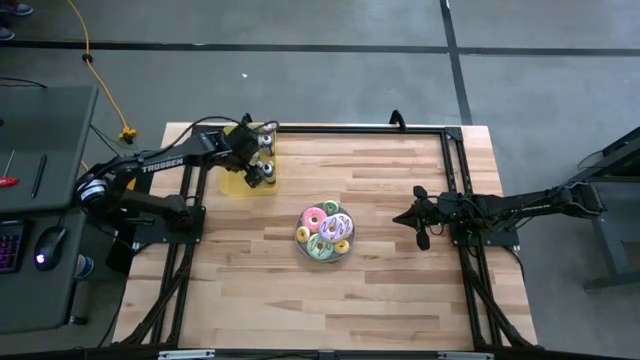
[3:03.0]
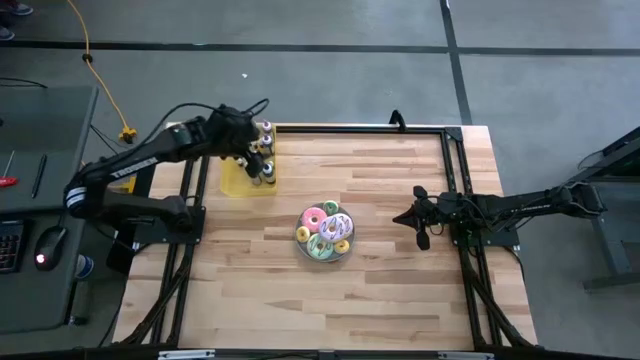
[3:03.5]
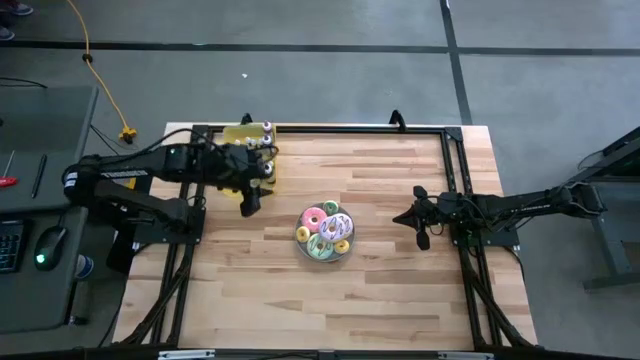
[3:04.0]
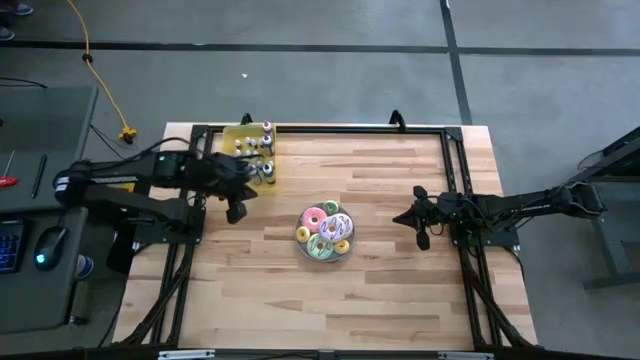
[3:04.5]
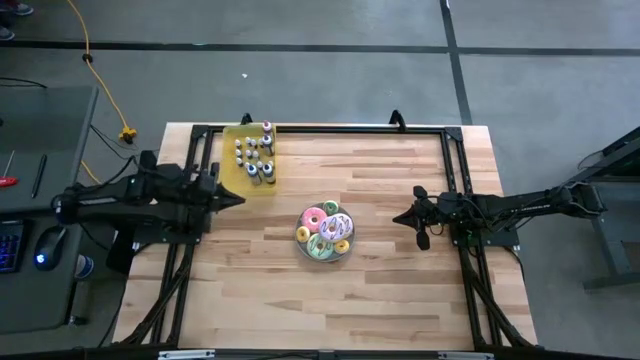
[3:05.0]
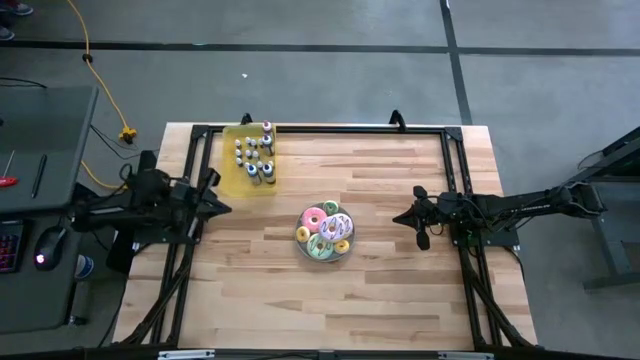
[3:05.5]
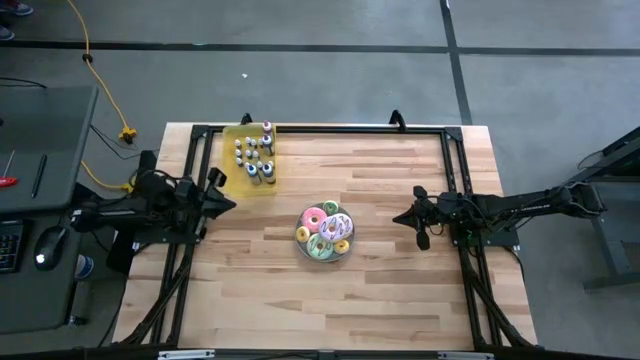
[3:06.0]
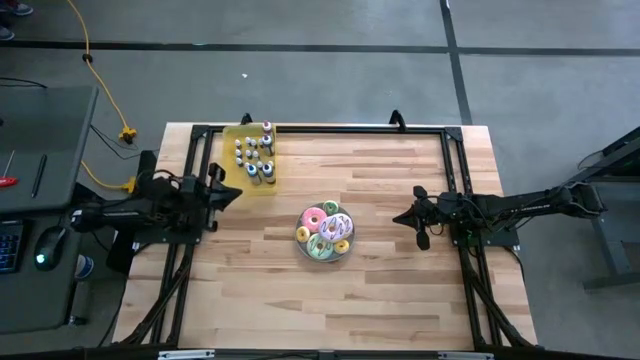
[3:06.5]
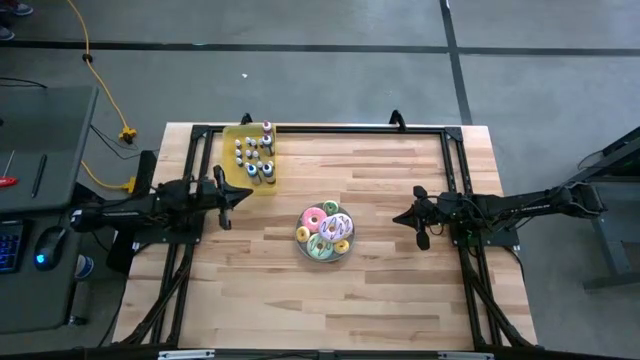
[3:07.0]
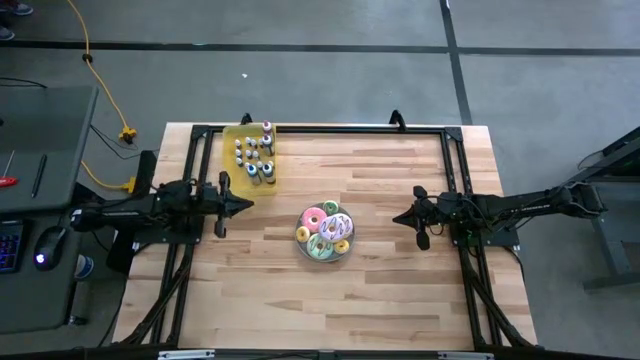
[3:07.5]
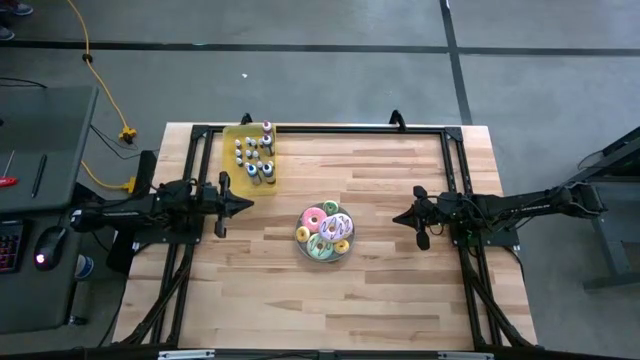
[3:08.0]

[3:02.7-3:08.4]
Task: Pick & Place food coloring
Return to Home Position

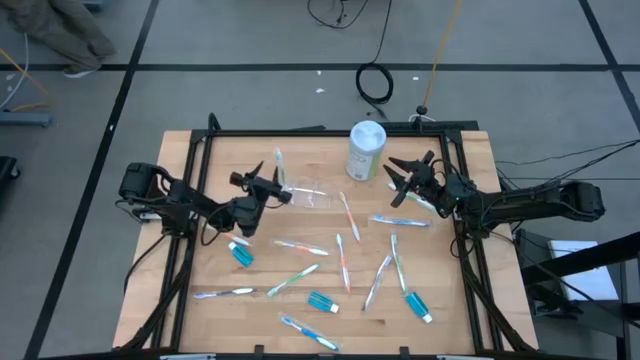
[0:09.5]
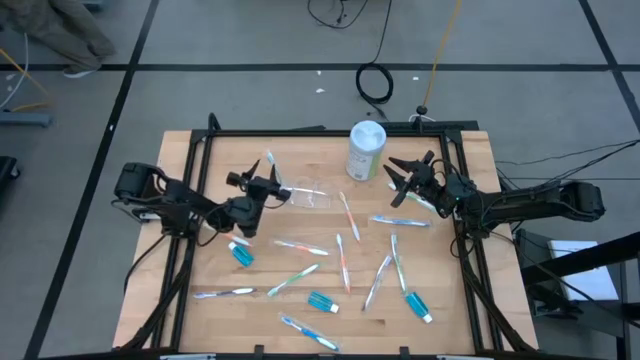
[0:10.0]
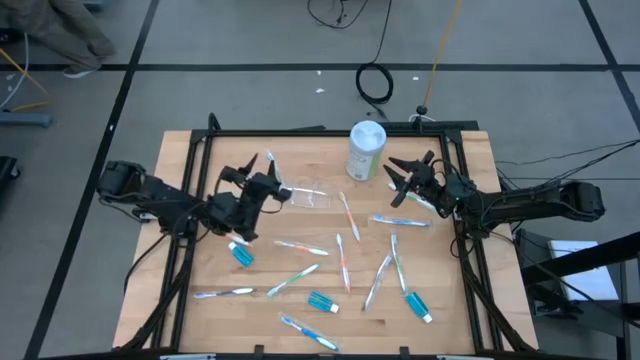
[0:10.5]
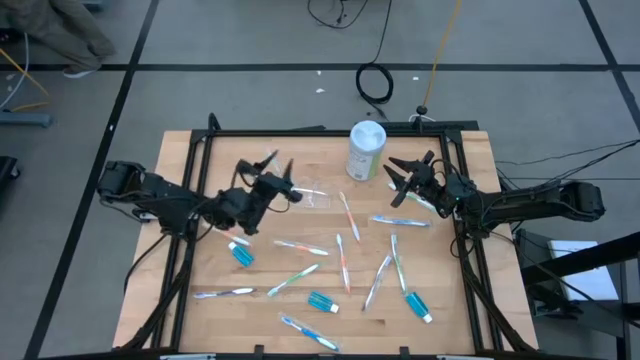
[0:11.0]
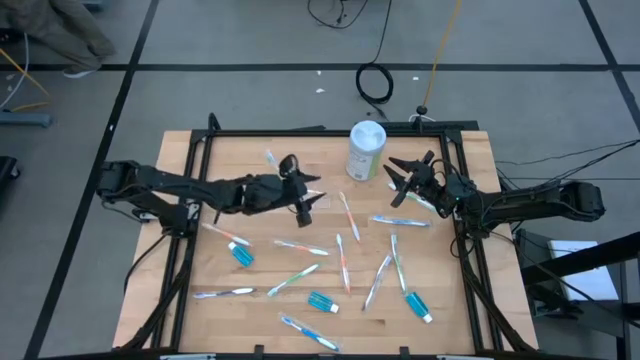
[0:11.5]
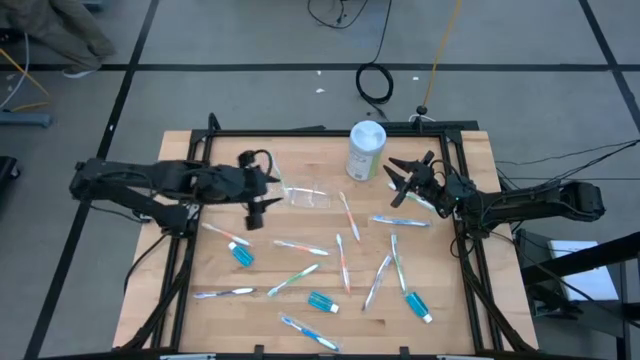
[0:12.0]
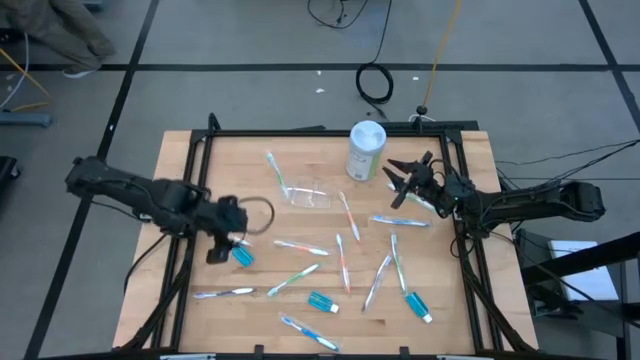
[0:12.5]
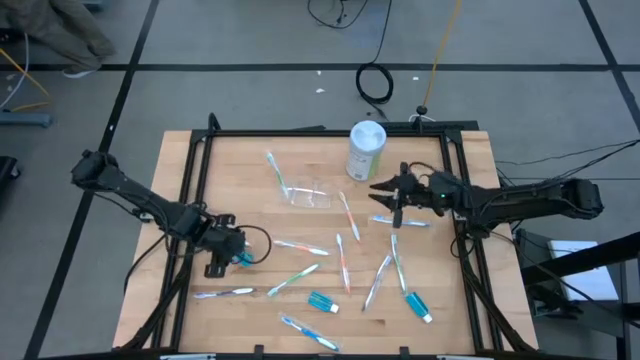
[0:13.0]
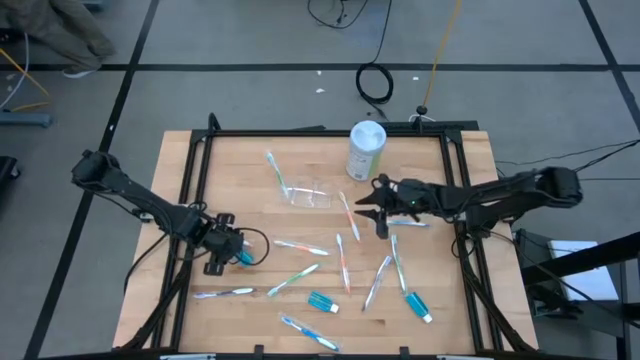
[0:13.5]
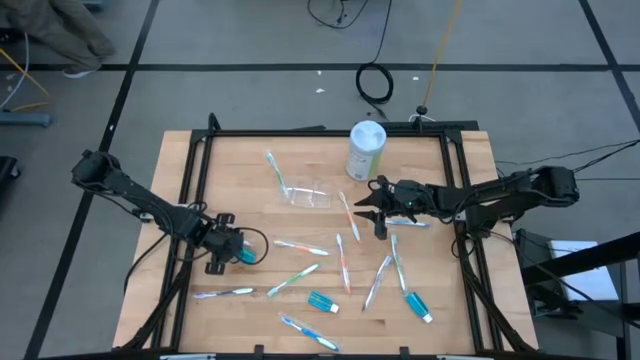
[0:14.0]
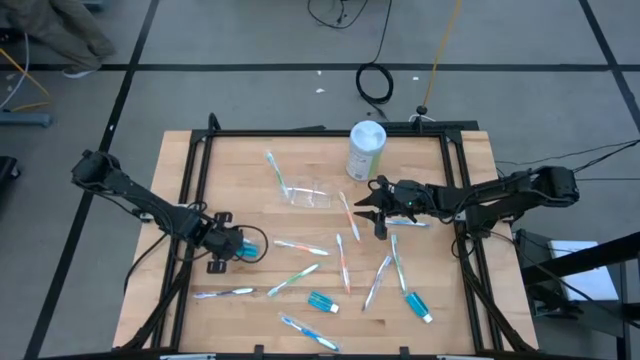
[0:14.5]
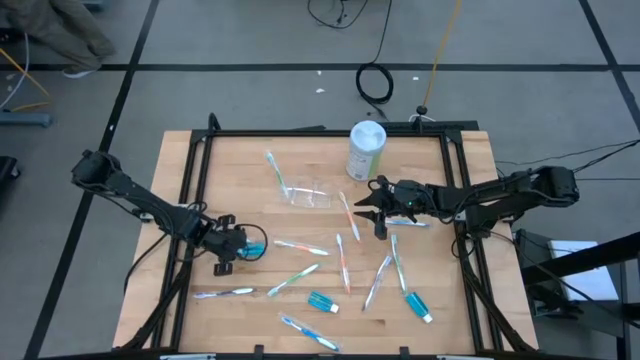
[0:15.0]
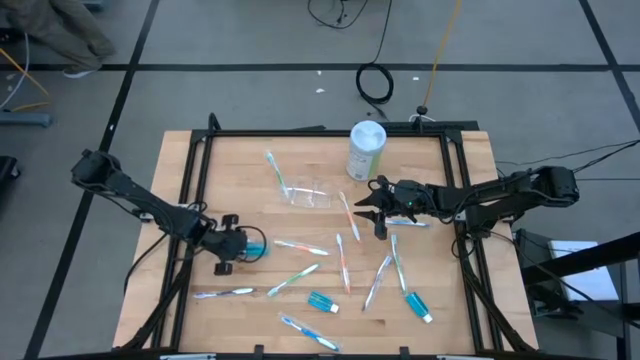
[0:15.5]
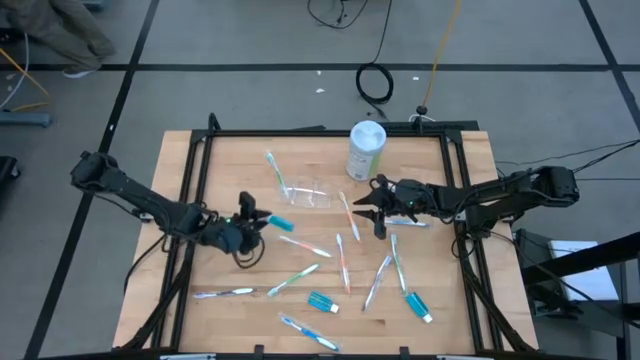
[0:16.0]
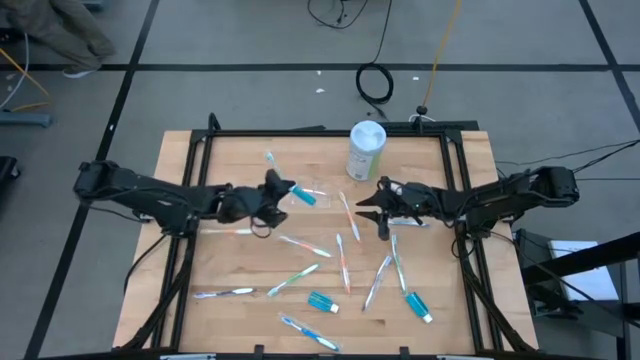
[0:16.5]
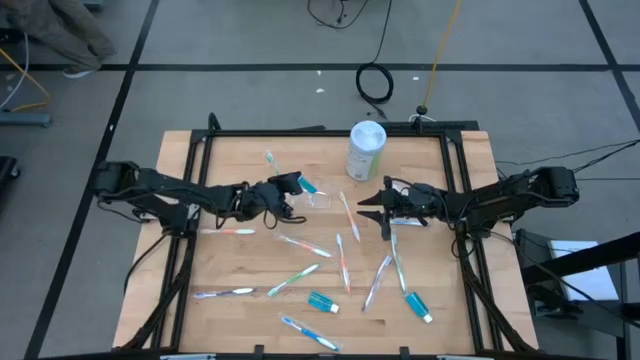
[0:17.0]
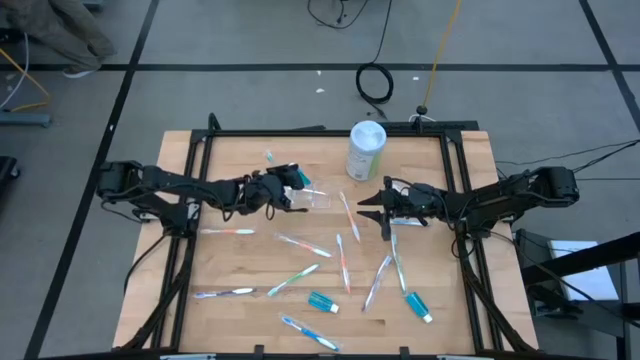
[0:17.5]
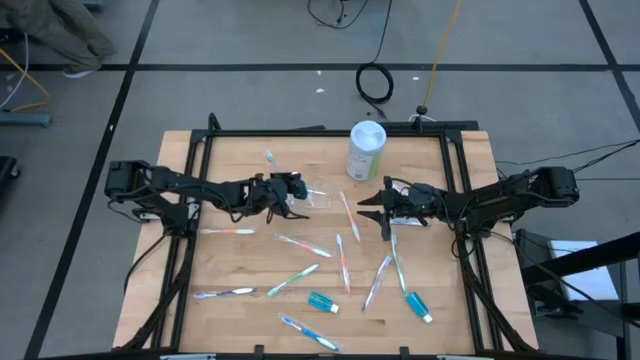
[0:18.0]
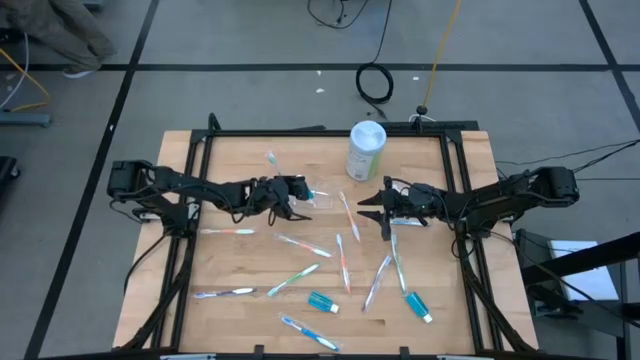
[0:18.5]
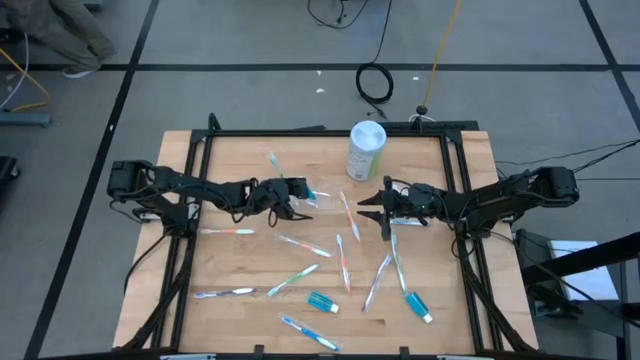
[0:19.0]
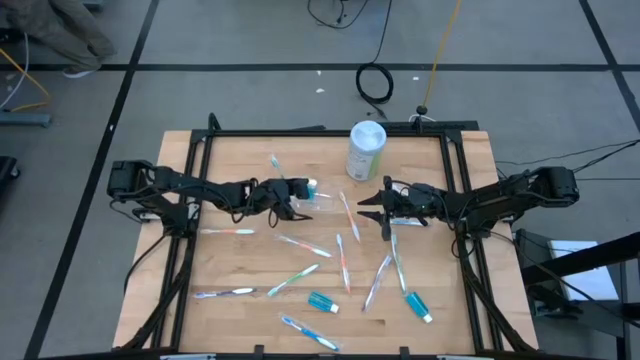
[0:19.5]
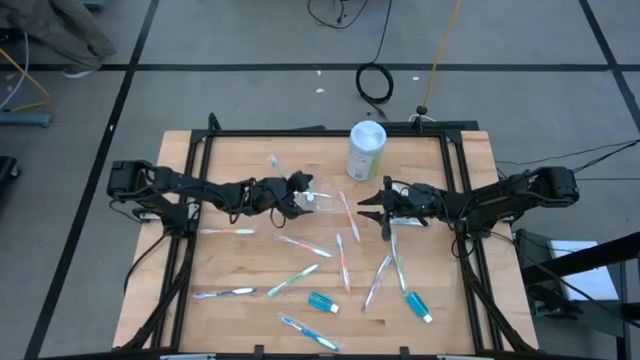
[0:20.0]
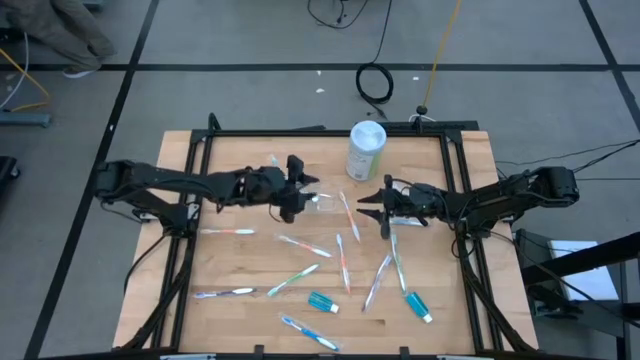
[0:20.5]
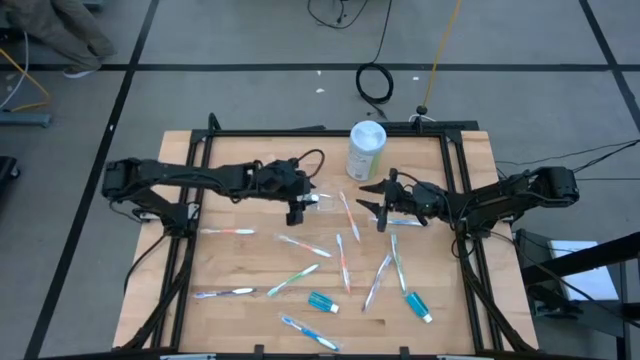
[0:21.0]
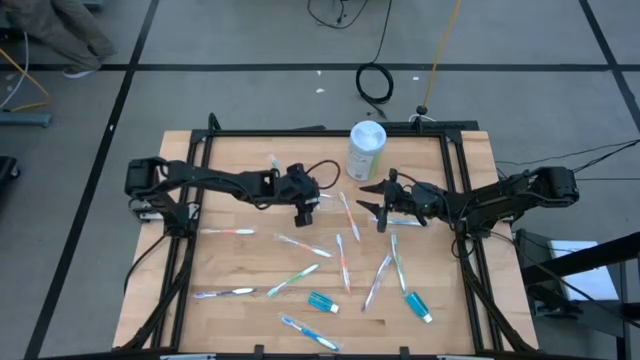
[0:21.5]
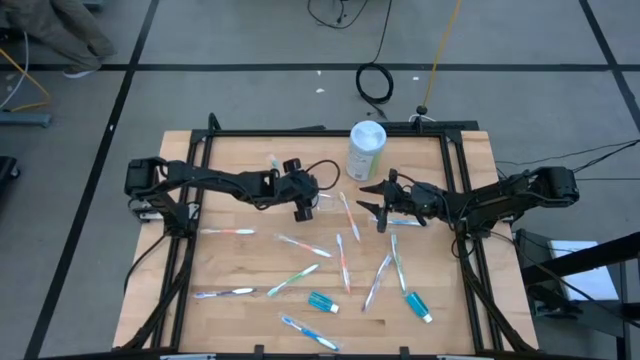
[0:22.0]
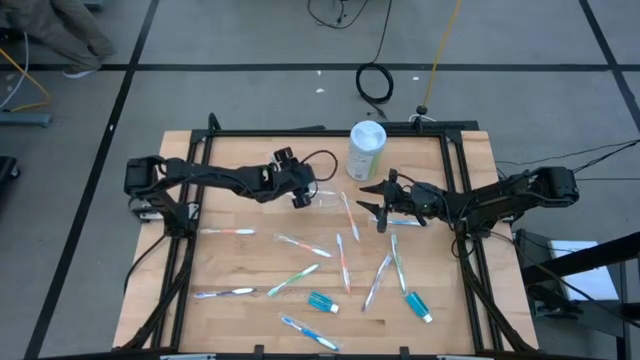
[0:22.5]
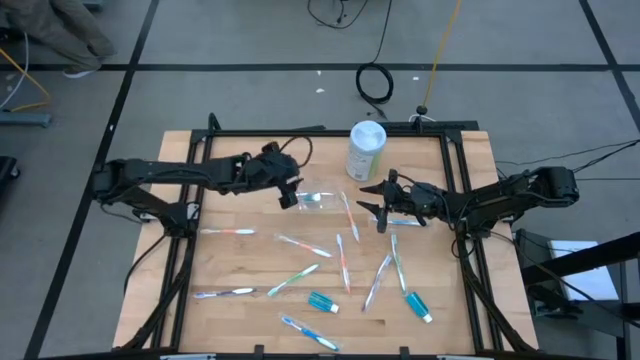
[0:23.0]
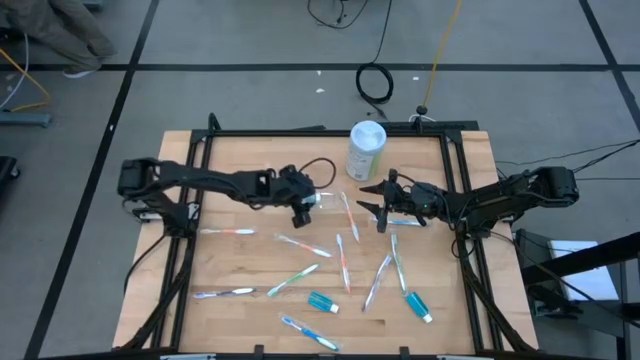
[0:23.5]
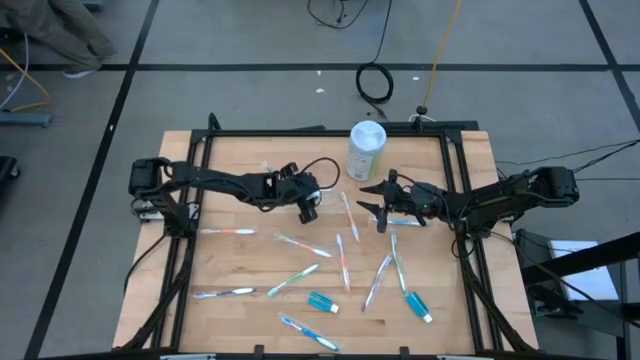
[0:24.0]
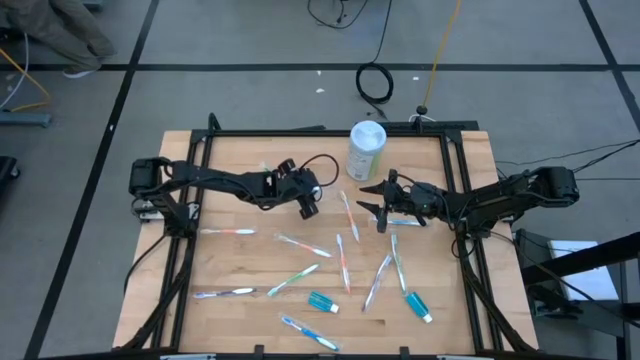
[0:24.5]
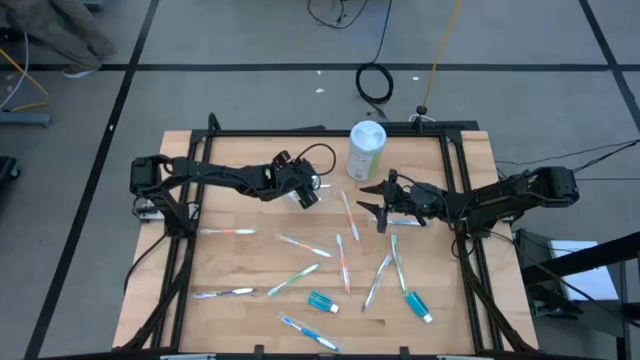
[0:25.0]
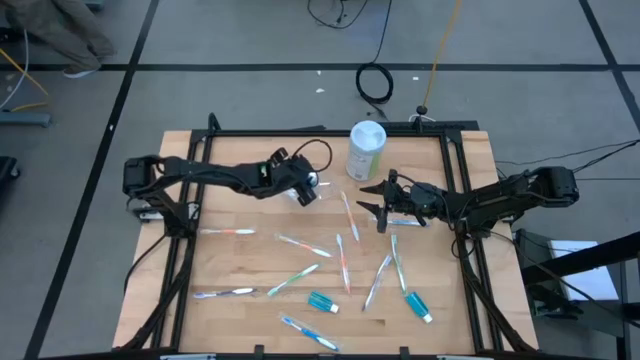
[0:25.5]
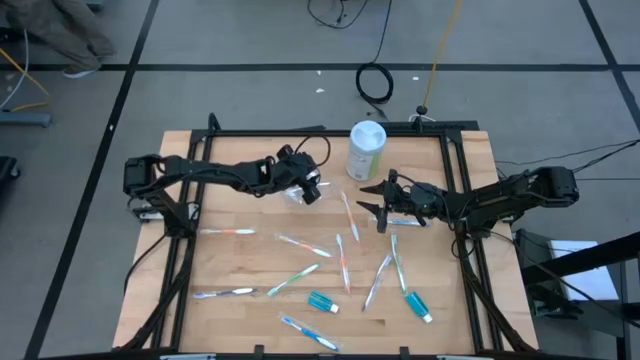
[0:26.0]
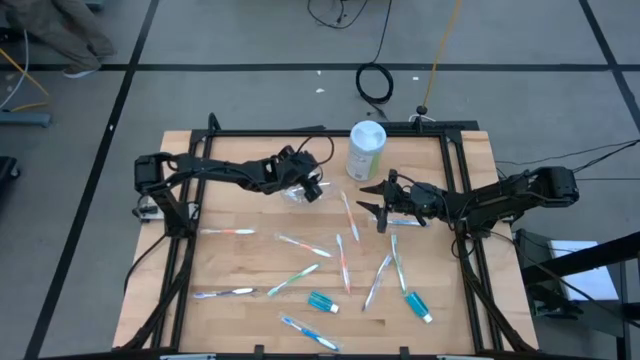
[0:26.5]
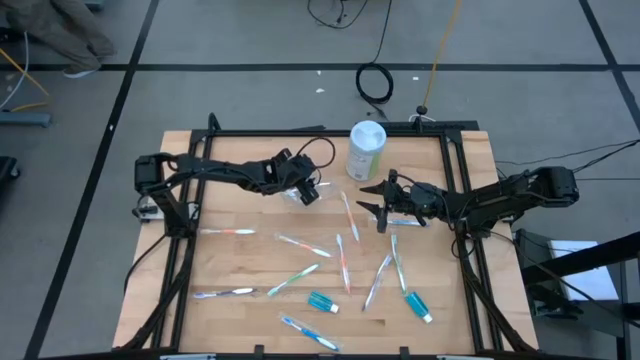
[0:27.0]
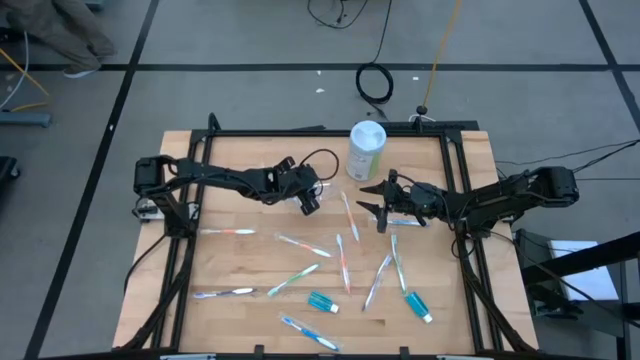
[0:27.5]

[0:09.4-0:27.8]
Task: Pick & Place toothbrushing station
Put the blue mouthwash into the transparent organizer
